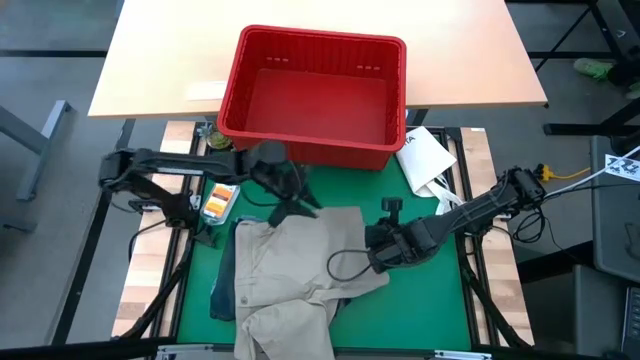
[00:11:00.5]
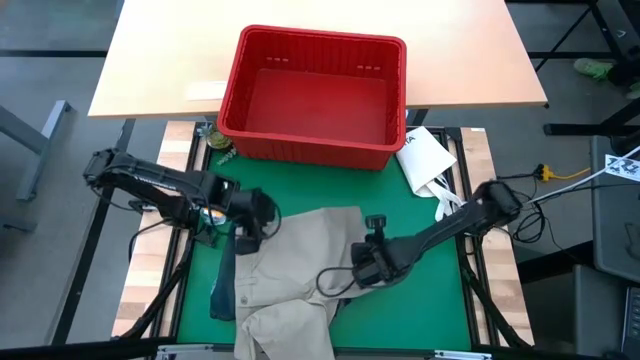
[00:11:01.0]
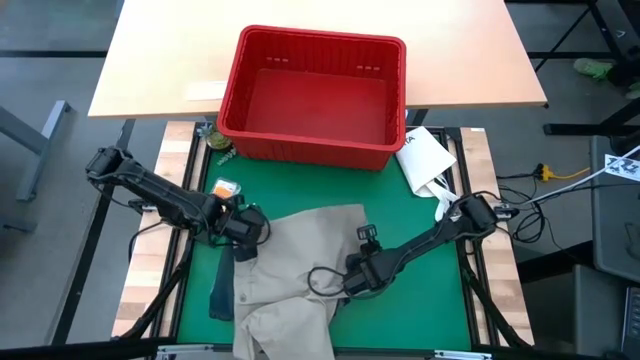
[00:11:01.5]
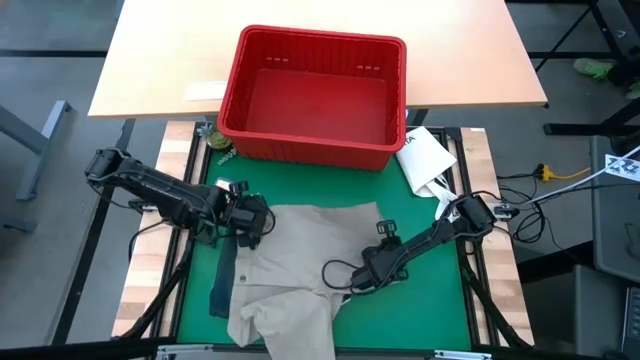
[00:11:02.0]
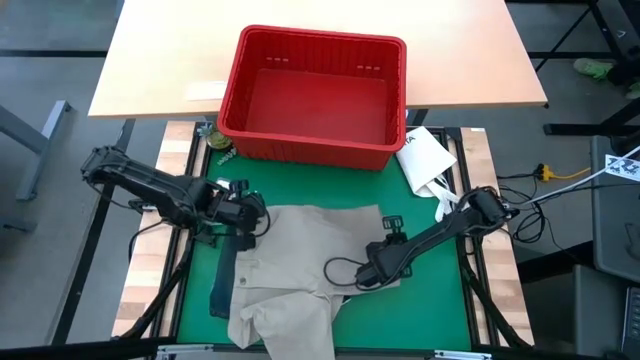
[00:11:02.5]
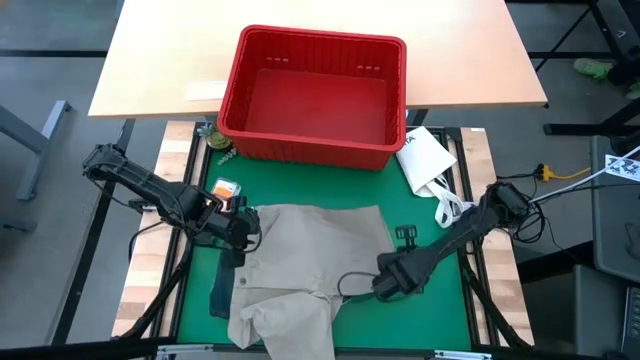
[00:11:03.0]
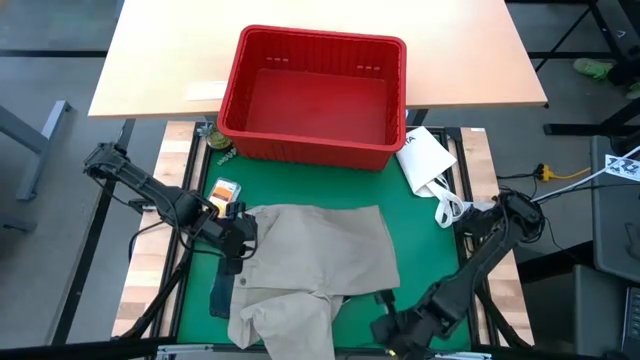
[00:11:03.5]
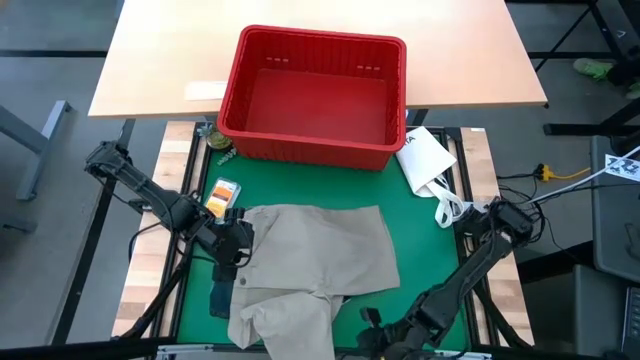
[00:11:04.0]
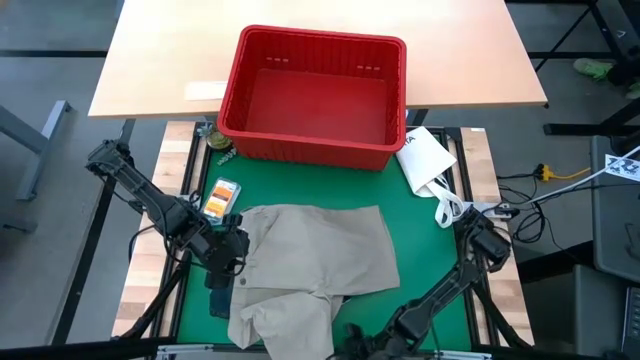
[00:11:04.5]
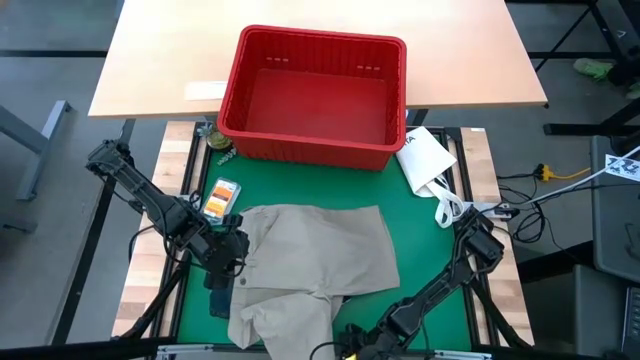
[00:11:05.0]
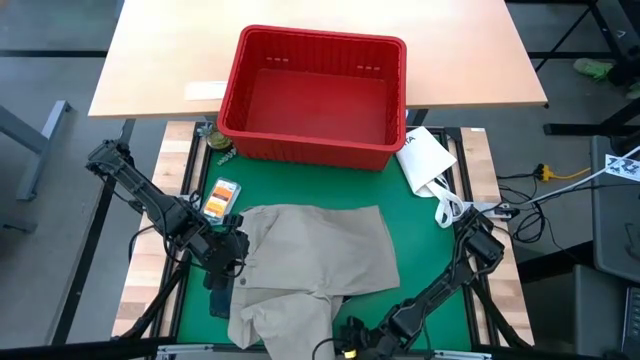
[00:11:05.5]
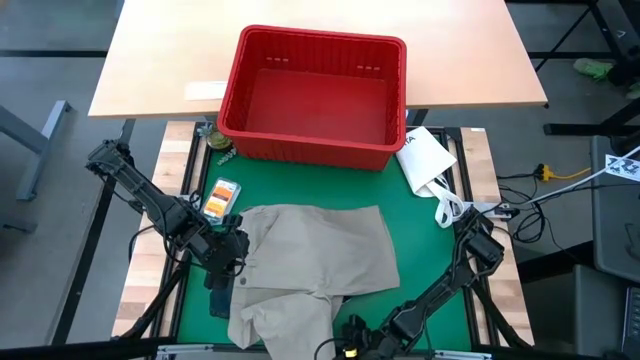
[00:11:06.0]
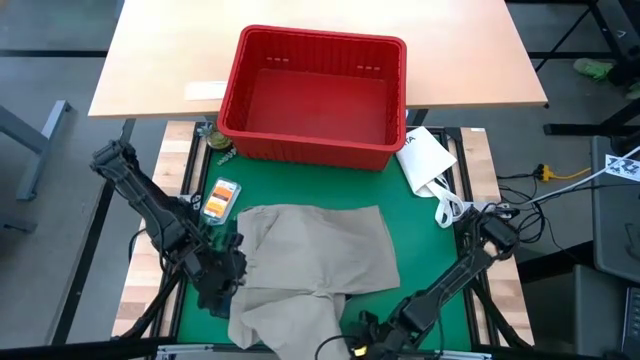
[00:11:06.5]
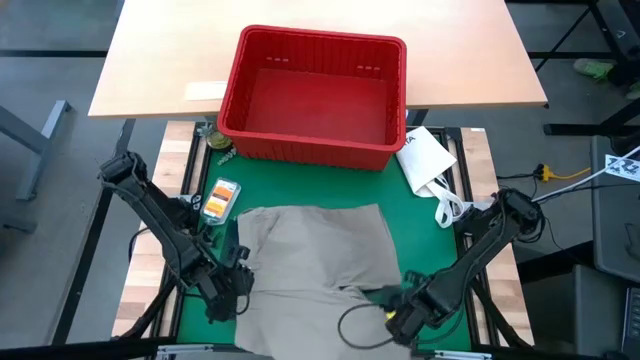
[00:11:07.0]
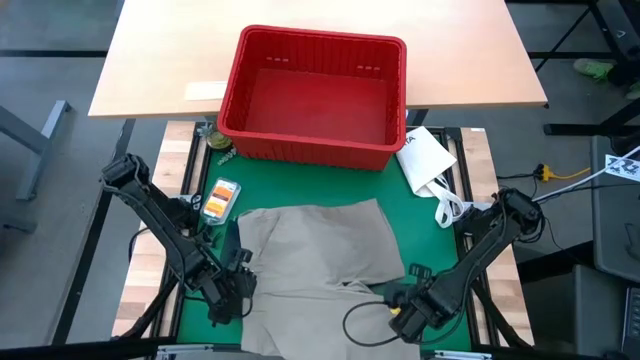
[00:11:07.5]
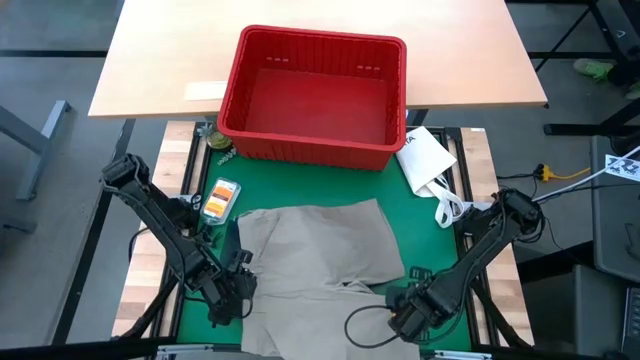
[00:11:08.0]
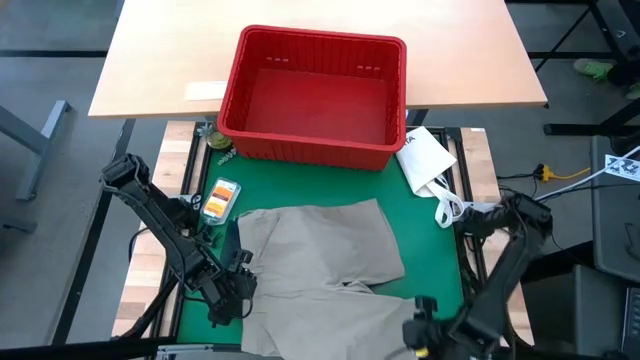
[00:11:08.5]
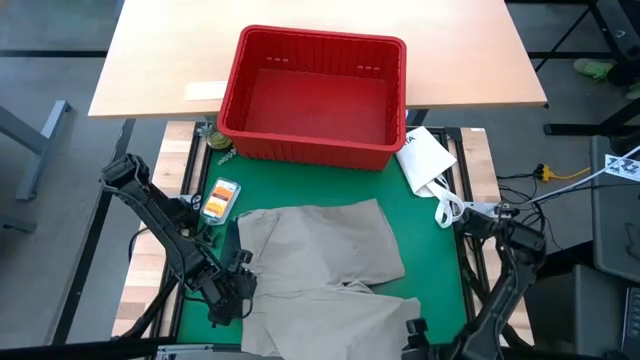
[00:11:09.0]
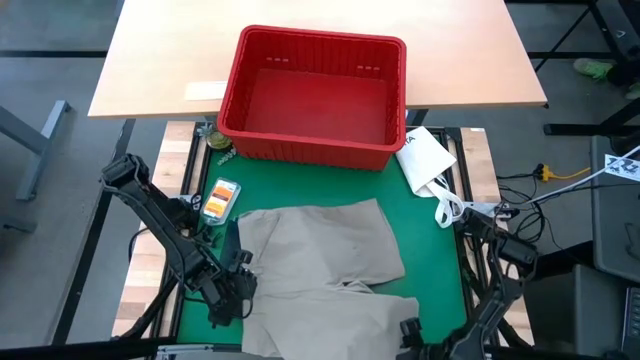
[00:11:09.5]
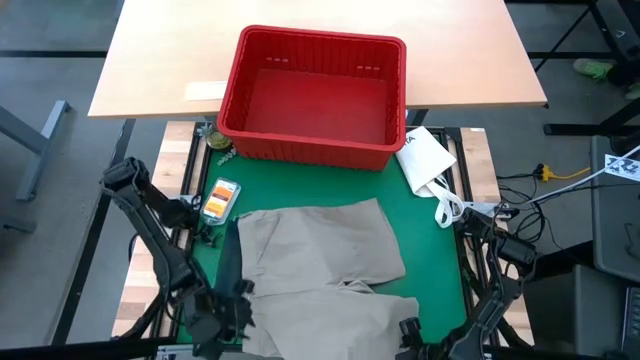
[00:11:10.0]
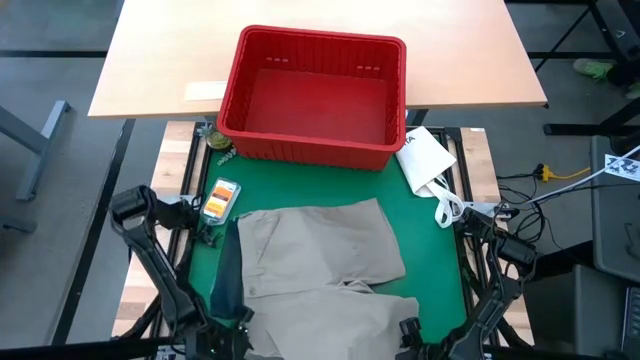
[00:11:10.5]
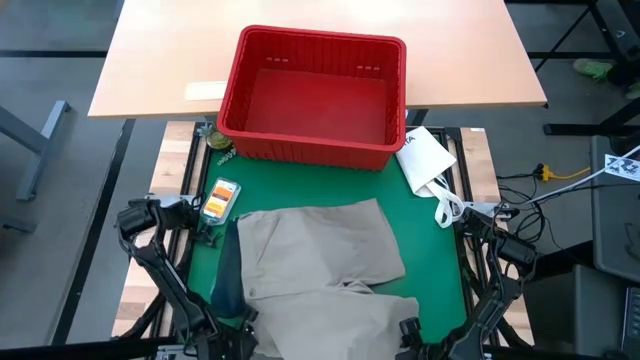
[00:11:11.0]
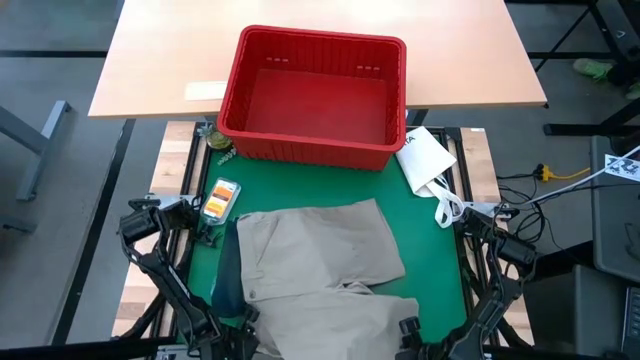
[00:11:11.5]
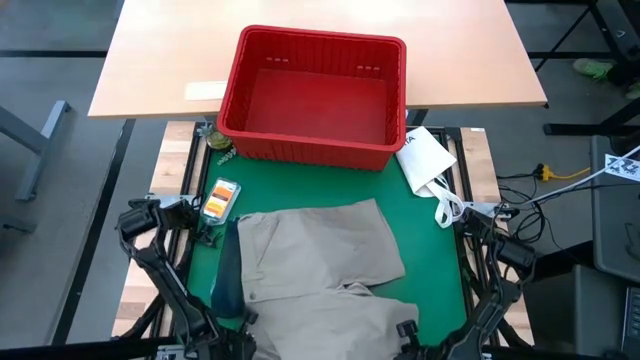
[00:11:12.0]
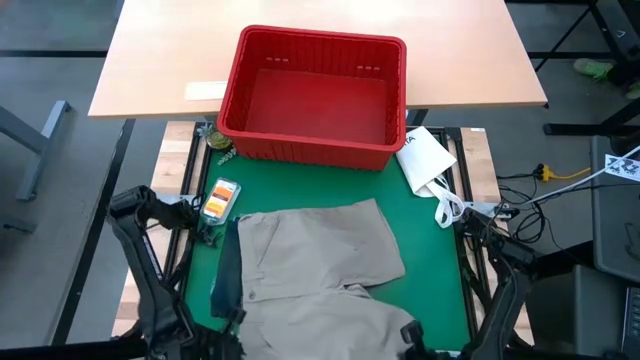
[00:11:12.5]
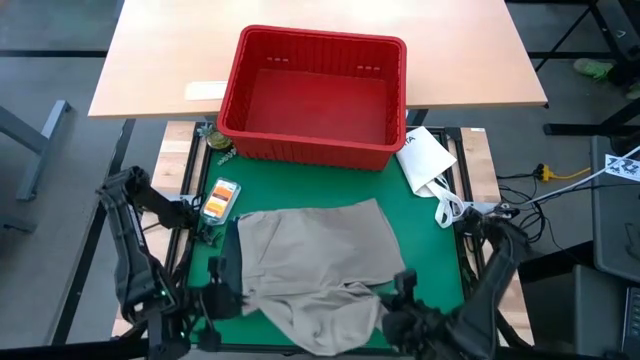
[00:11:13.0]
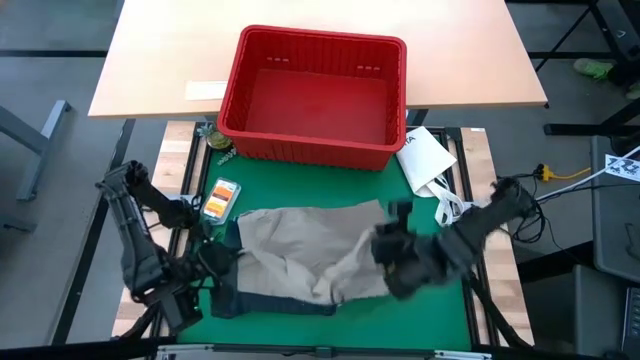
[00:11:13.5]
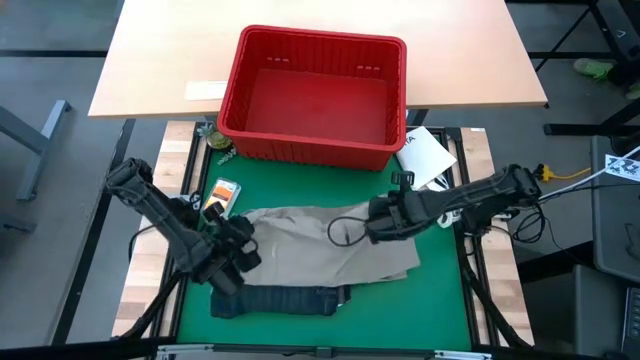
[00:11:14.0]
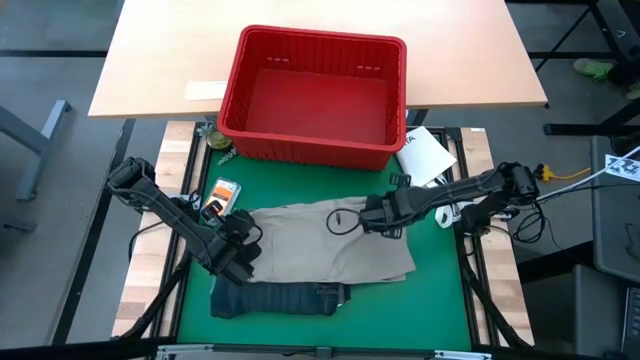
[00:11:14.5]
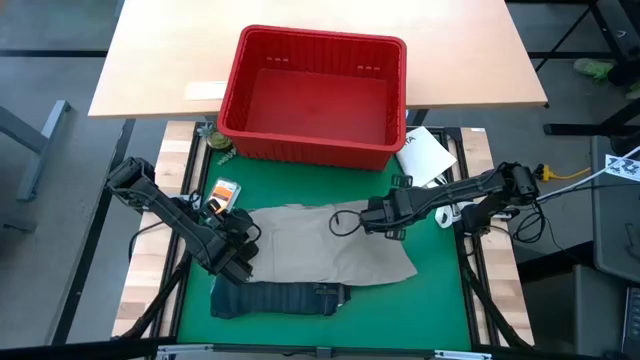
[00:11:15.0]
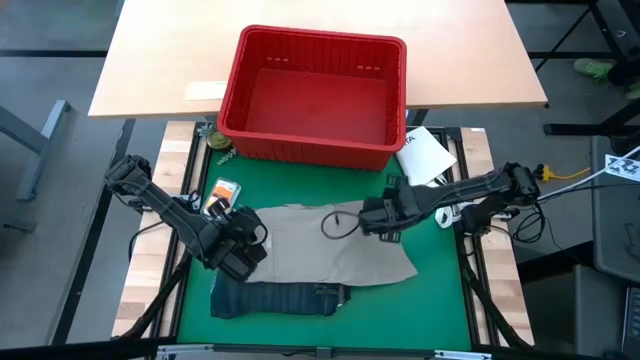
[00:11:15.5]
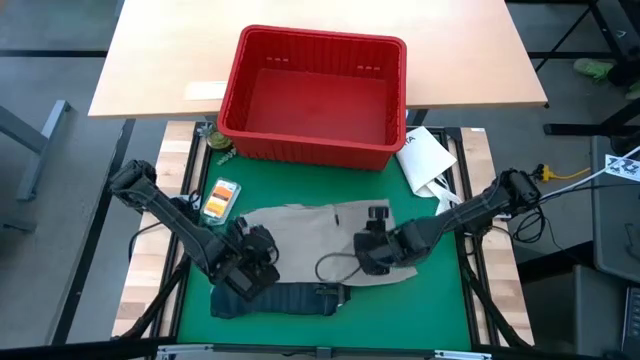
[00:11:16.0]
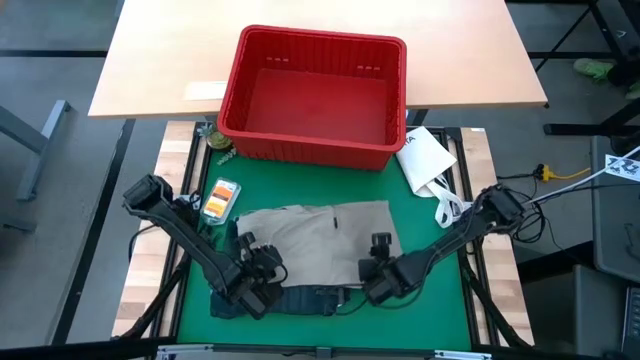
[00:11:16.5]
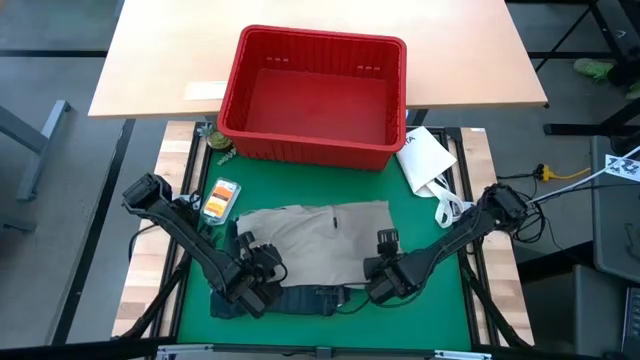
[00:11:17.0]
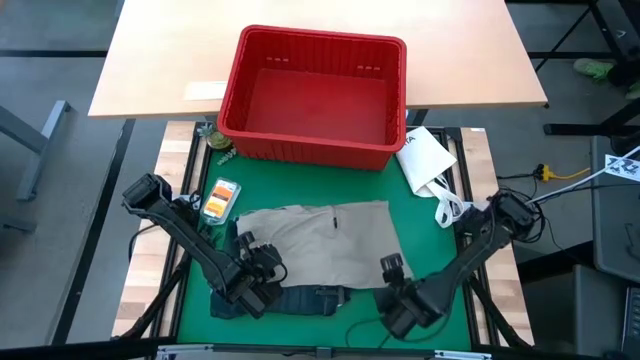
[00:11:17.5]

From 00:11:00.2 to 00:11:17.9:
Task: Fold Laundry from Bin
Fold the gray short

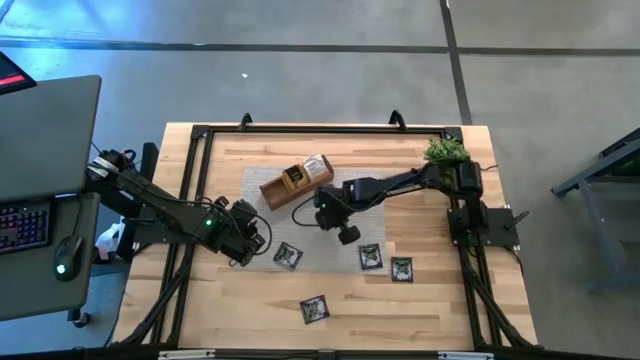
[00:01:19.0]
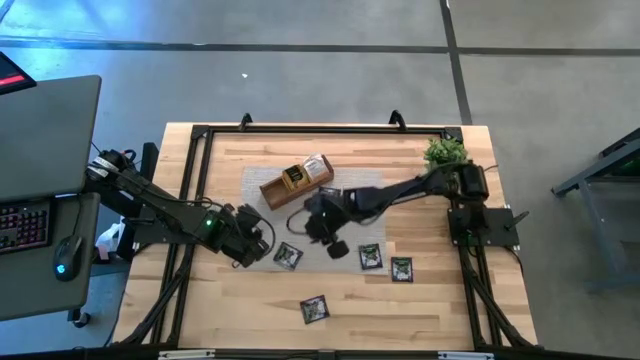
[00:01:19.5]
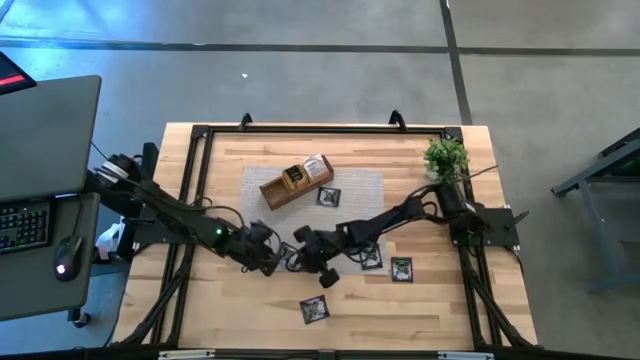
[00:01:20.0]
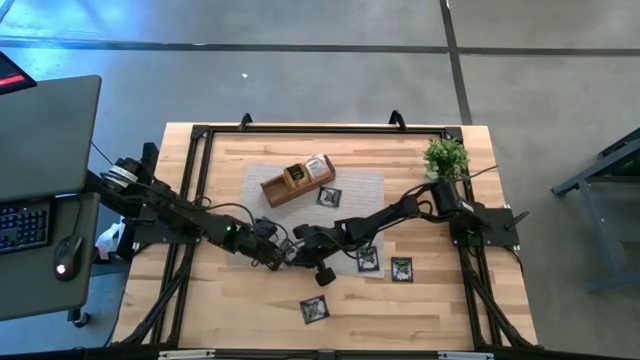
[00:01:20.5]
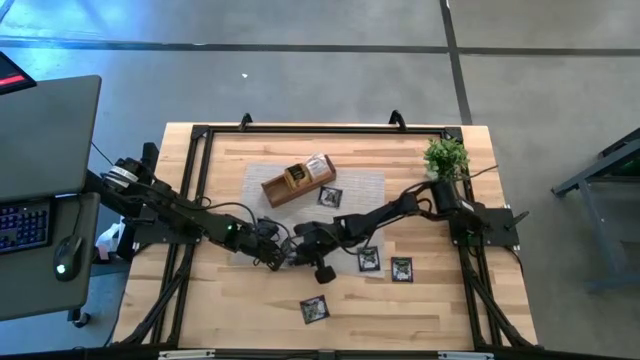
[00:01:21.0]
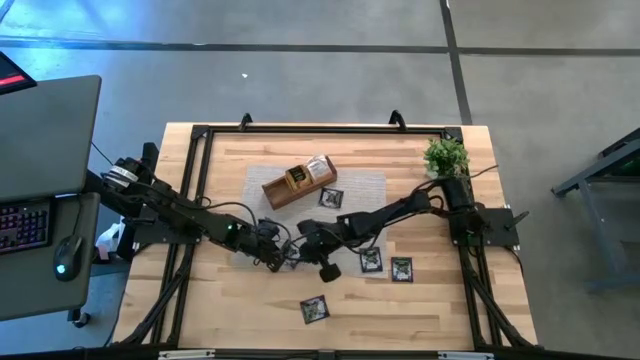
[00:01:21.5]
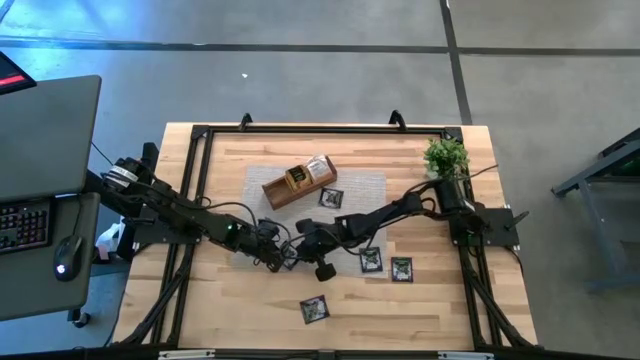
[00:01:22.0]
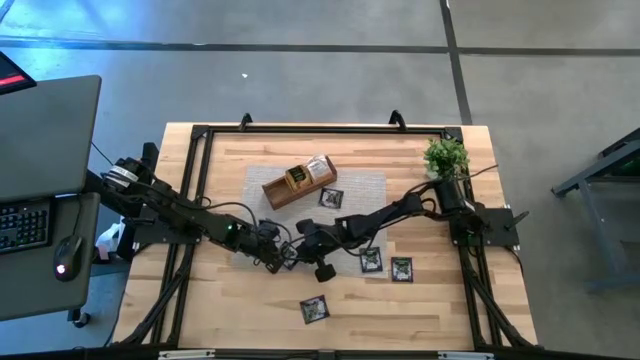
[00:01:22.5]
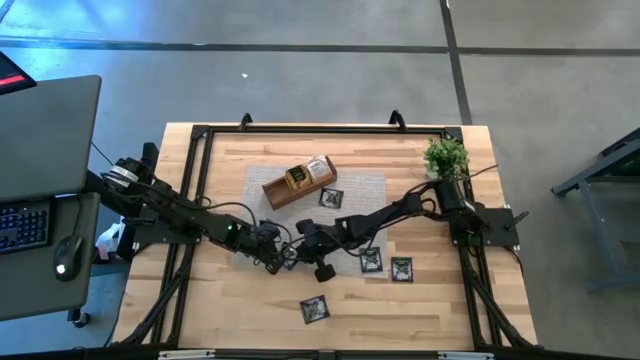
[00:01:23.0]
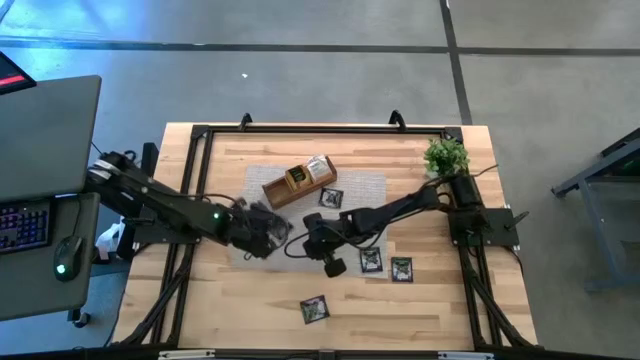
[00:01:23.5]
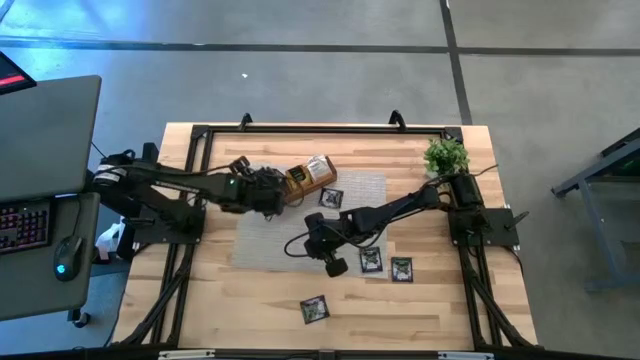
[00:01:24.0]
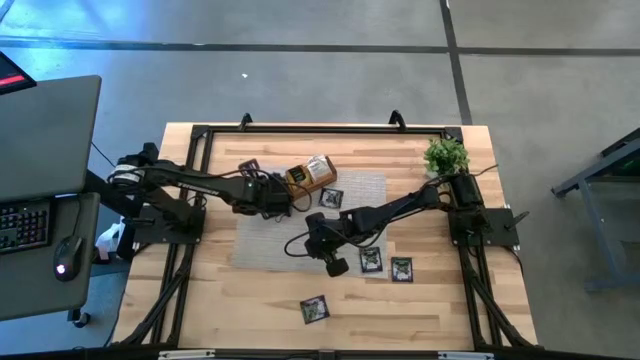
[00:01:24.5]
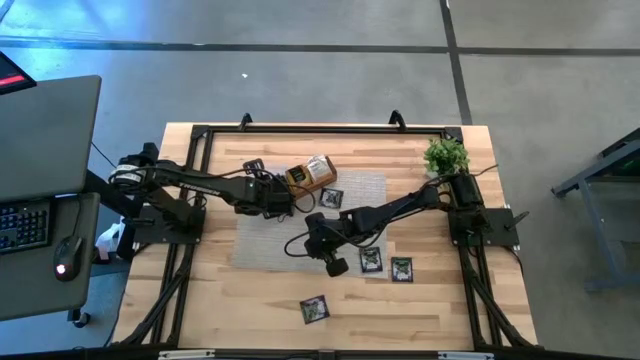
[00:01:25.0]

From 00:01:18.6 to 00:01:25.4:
Task: Pick & Place Tea
Put the purple tea bag into the left section of the wooden organizer
